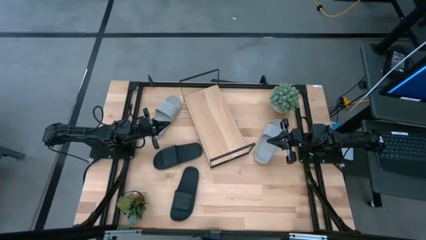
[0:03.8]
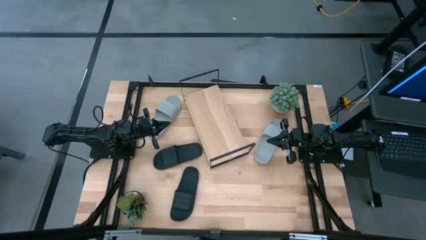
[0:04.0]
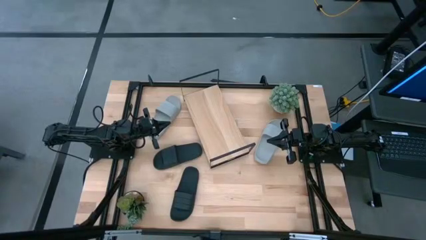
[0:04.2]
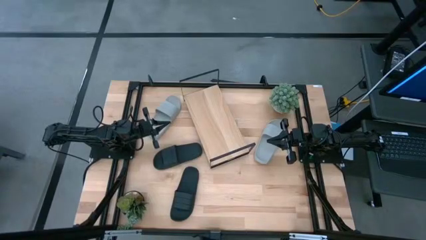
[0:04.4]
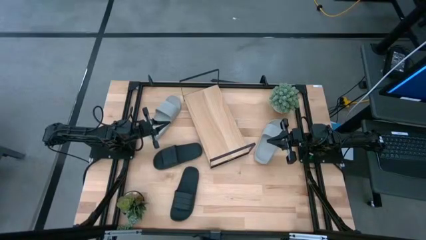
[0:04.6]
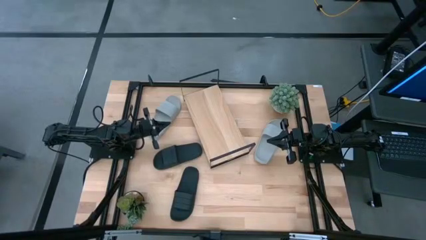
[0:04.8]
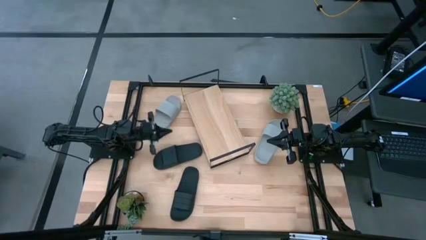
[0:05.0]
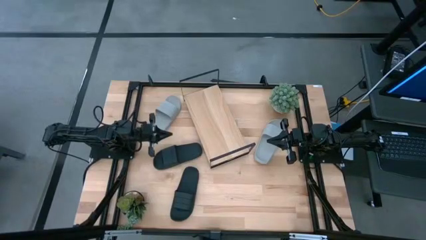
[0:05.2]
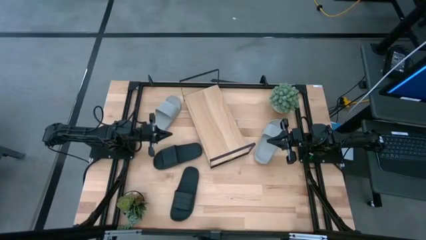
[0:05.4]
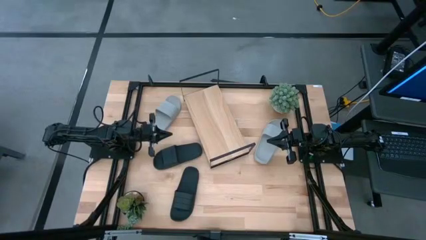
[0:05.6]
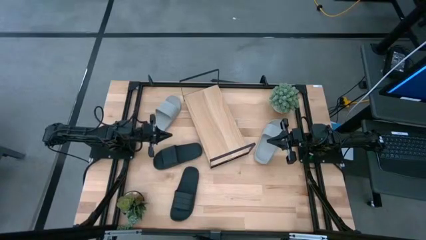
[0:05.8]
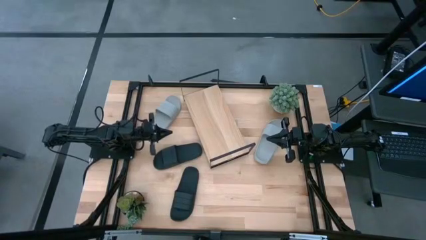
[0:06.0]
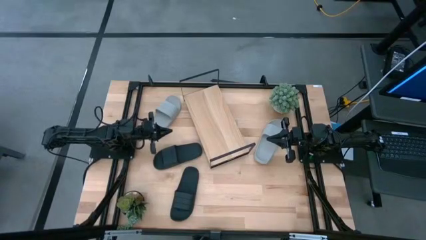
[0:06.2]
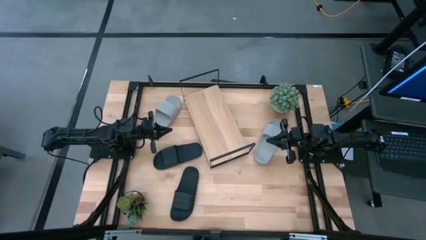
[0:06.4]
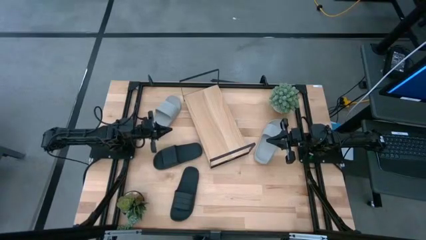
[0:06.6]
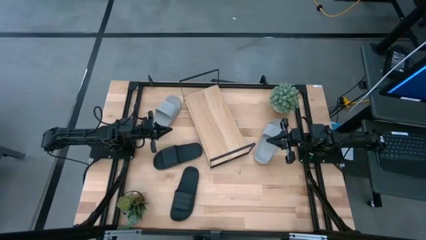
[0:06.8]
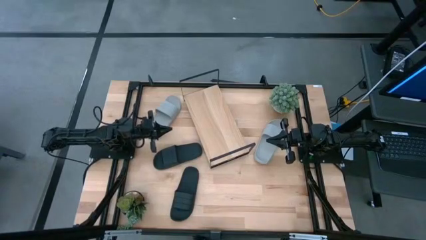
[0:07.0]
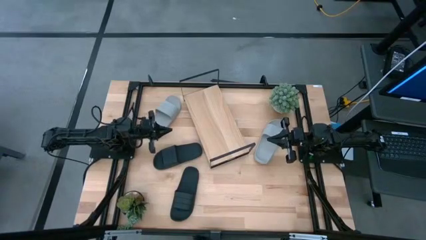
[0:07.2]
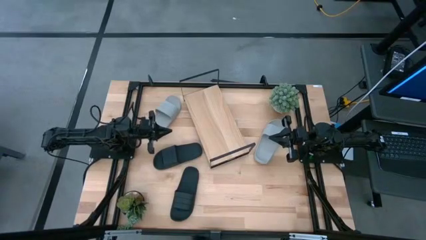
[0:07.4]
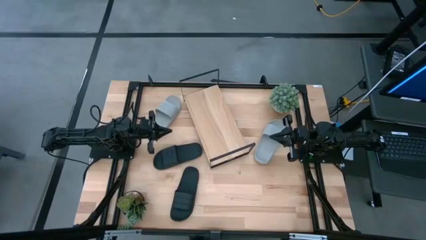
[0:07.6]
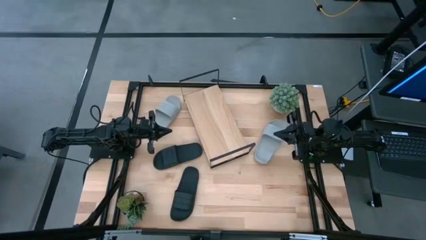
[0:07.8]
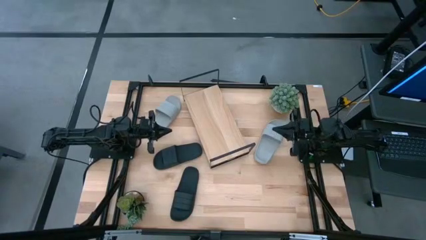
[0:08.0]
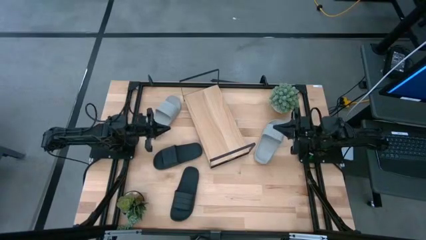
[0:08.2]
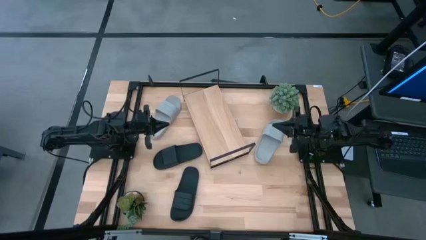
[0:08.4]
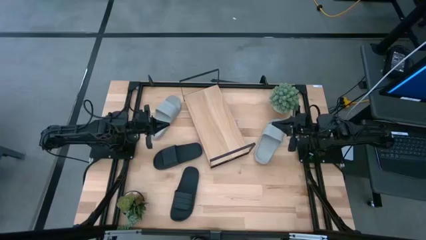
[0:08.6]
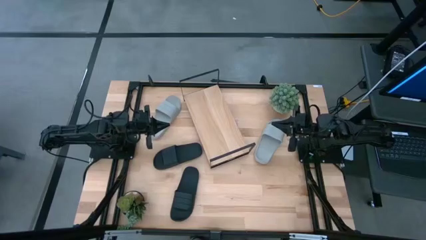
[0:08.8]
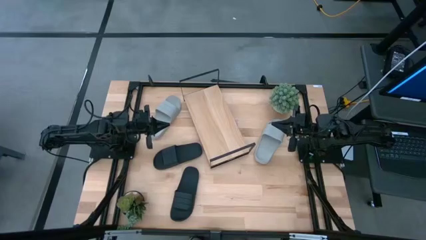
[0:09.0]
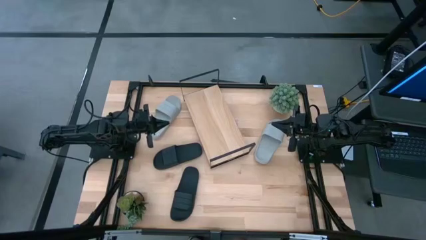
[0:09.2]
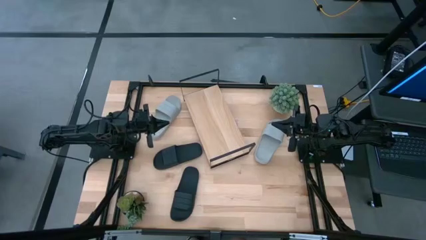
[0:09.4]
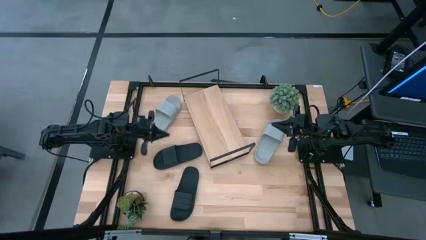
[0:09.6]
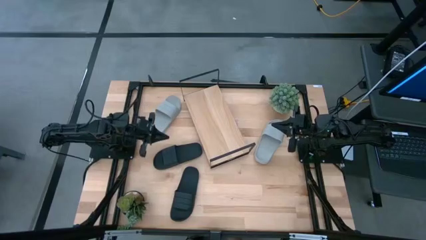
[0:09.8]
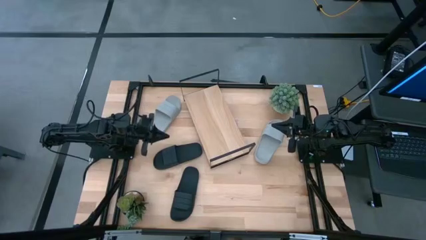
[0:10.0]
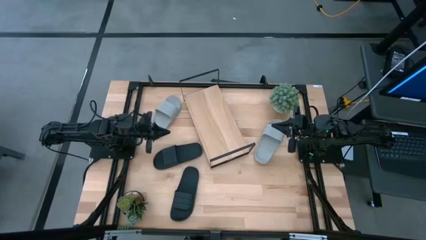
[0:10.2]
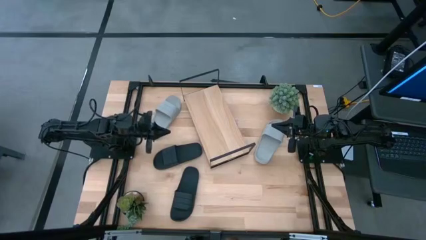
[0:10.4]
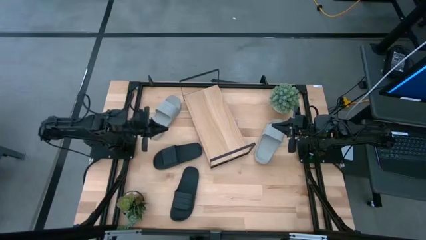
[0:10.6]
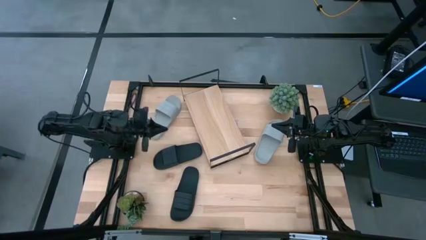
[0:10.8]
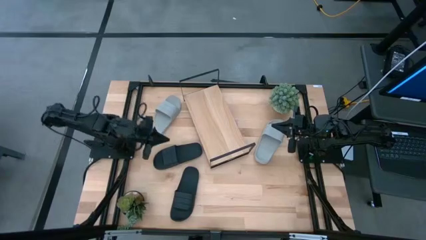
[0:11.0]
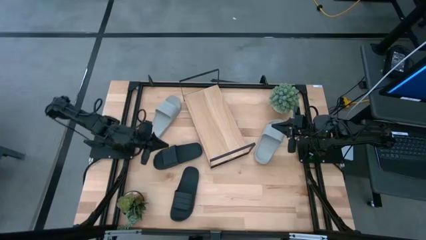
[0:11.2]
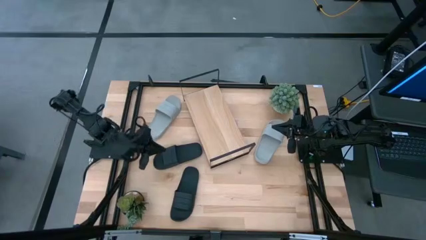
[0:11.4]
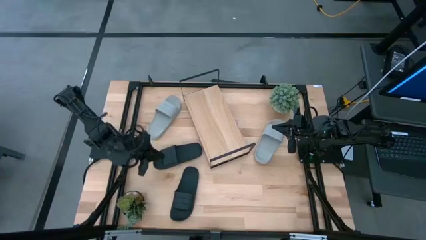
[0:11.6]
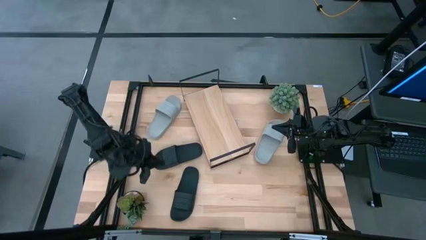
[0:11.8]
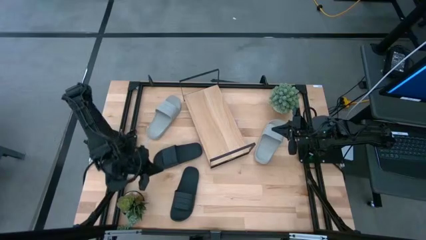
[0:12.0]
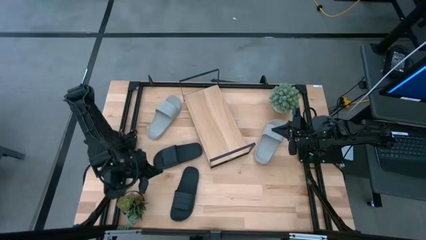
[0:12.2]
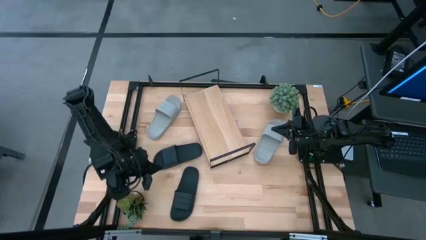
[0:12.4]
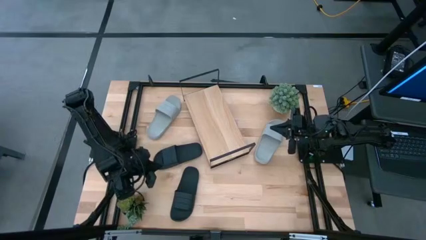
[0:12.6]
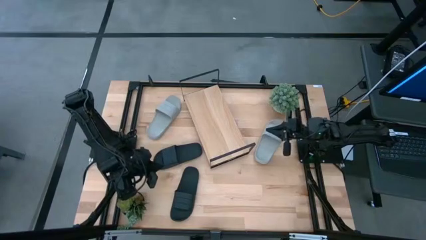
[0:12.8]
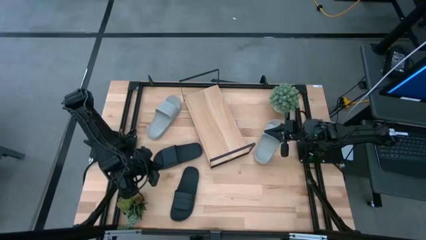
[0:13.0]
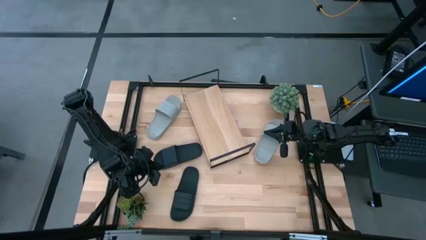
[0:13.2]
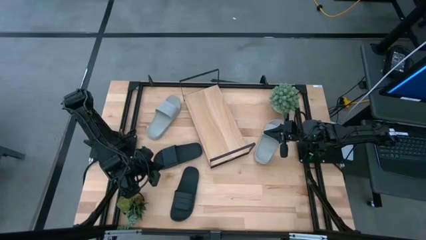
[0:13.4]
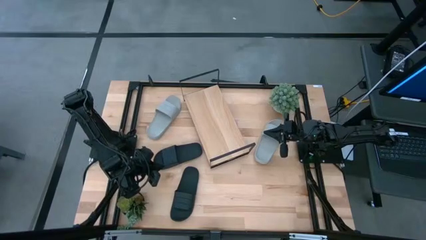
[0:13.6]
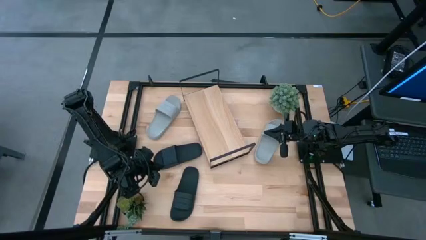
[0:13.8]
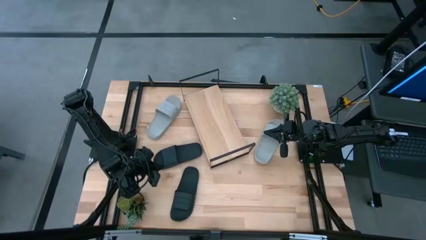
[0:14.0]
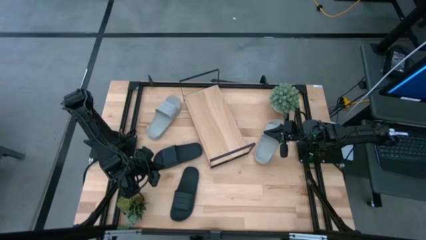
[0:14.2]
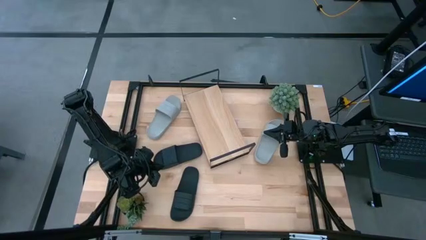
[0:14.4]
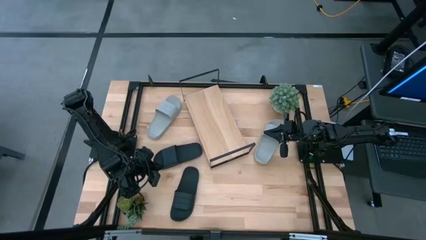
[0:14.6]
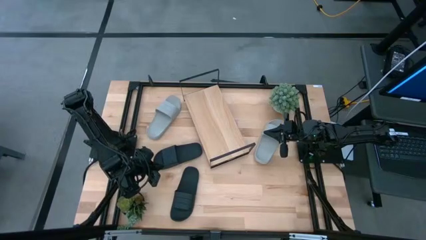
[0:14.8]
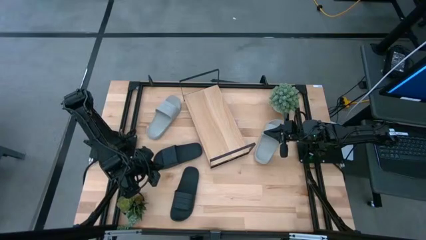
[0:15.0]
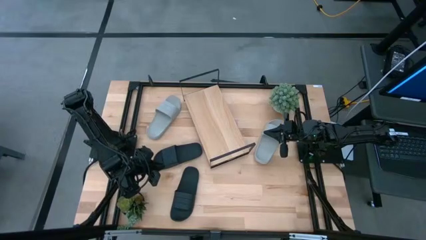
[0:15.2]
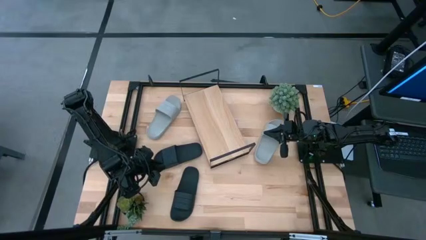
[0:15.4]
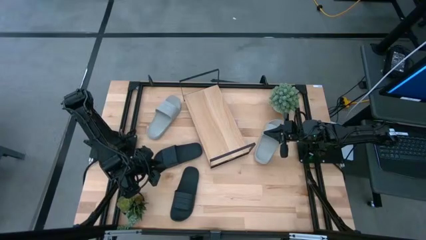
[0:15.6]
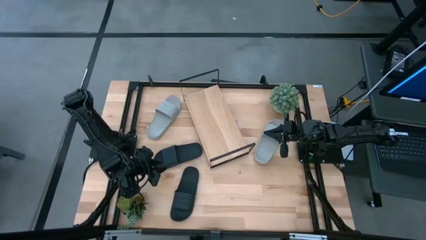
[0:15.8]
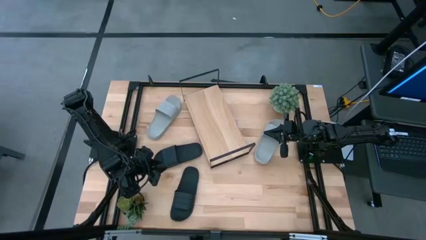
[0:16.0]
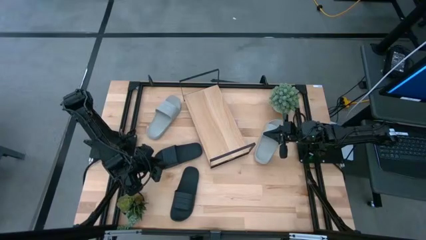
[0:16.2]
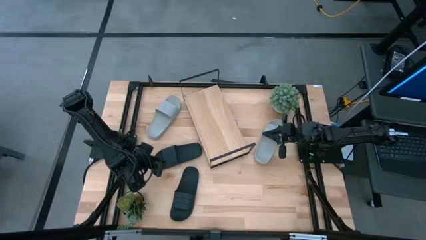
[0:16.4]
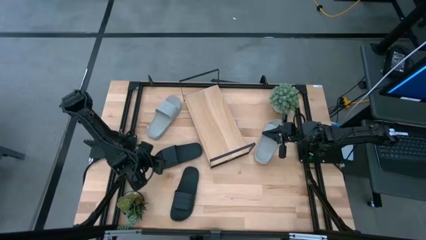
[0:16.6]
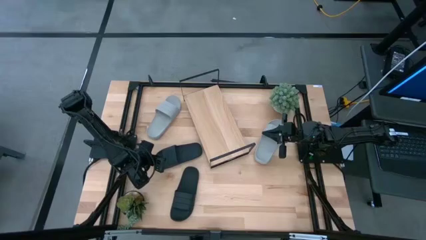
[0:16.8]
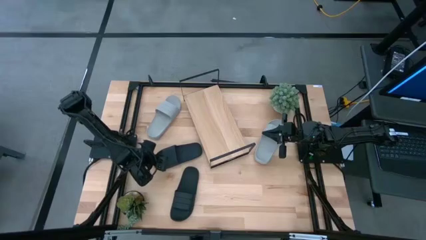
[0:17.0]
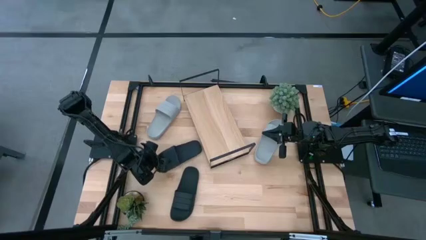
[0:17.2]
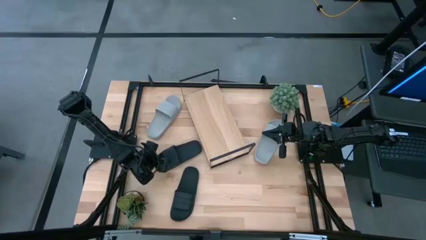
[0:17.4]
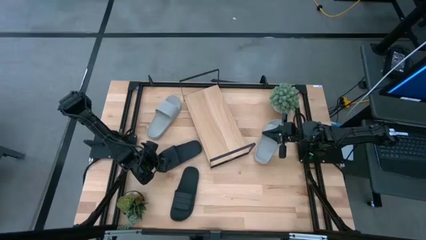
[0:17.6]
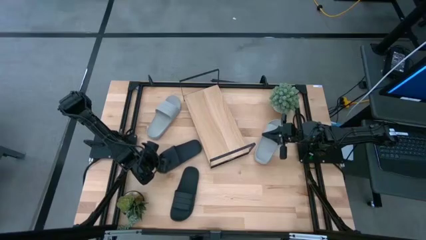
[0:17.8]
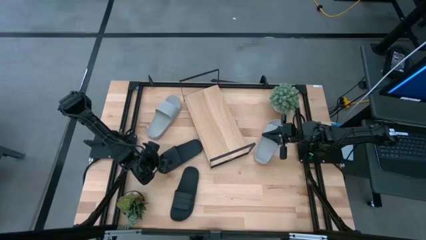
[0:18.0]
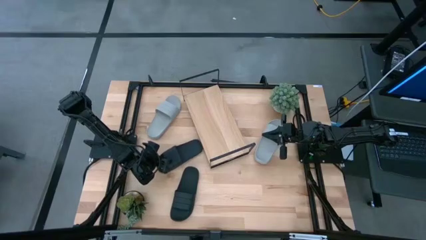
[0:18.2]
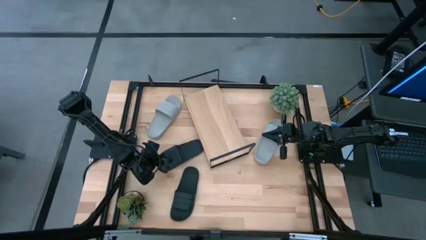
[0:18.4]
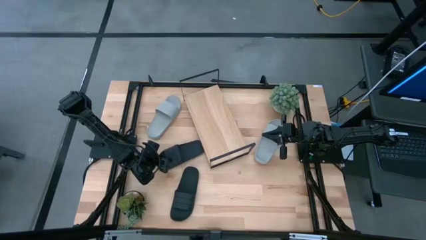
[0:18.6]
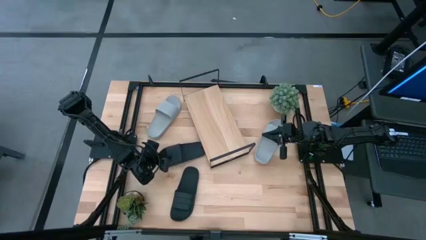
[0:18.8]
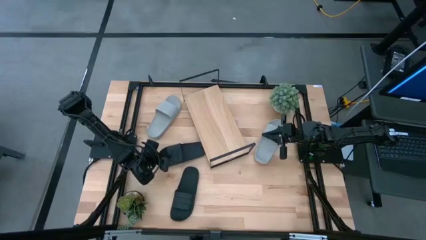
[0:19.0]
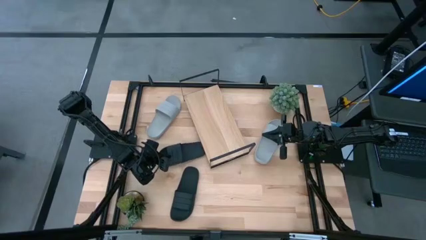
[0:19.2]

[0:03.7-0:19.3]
Task: Pick and place slides into the shelf
Put the top black slide on the shelf
